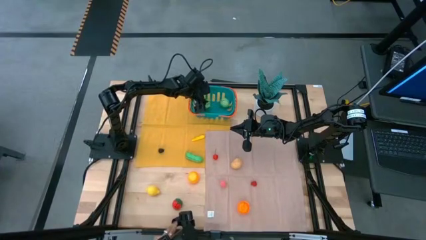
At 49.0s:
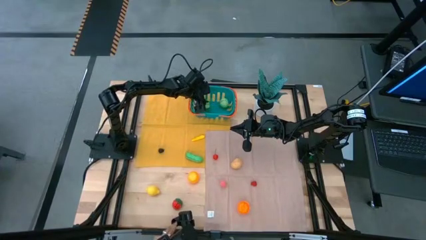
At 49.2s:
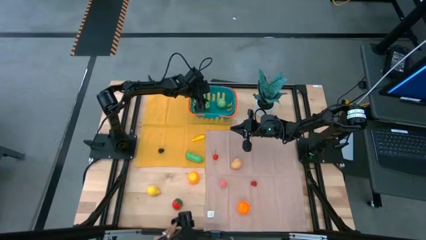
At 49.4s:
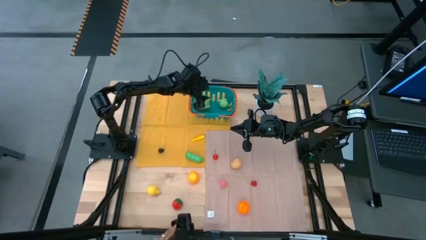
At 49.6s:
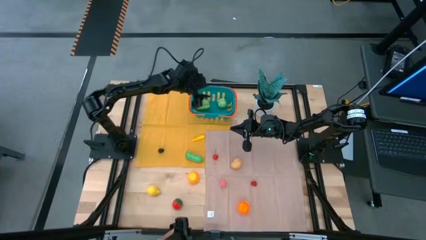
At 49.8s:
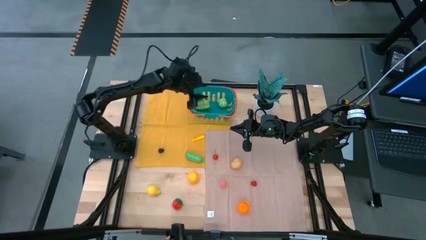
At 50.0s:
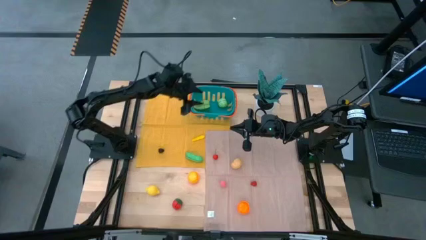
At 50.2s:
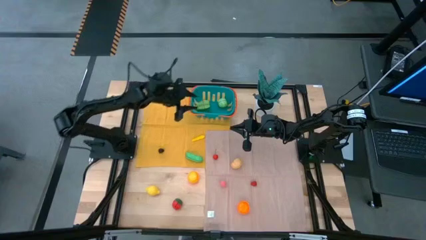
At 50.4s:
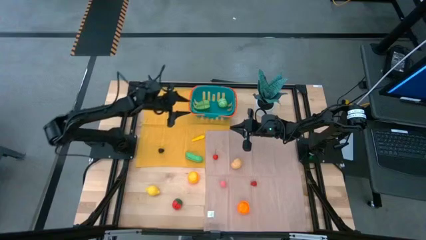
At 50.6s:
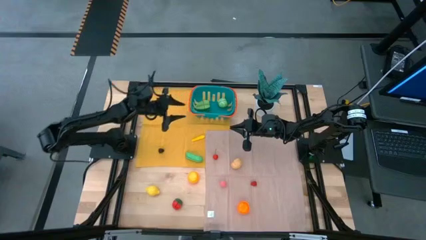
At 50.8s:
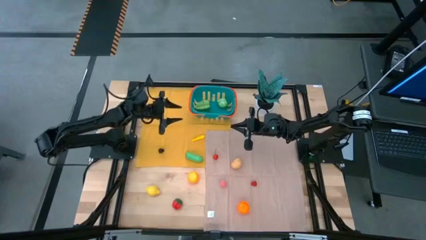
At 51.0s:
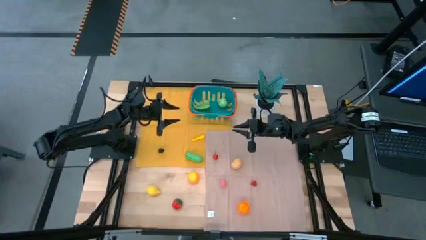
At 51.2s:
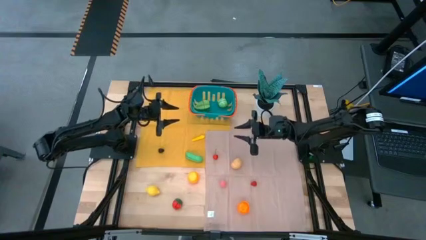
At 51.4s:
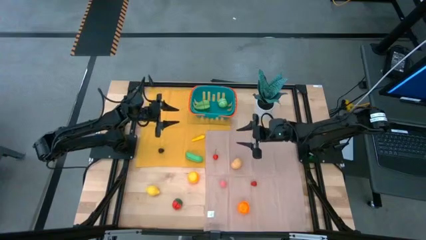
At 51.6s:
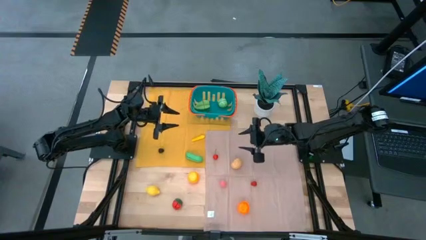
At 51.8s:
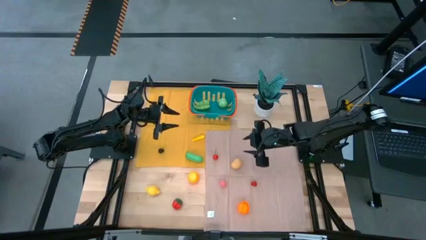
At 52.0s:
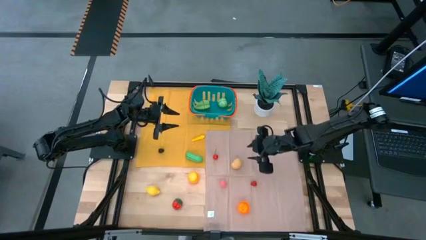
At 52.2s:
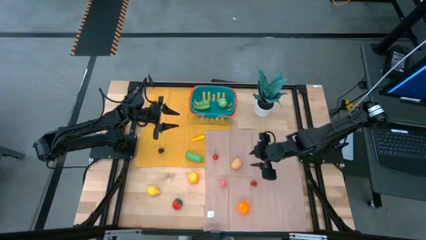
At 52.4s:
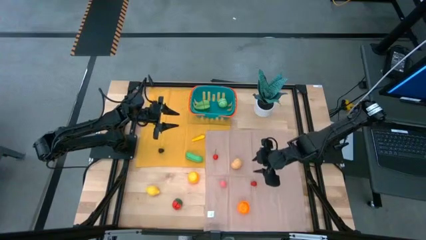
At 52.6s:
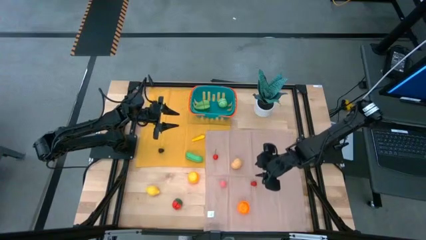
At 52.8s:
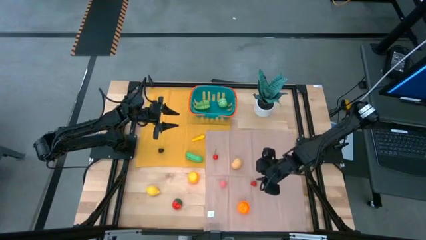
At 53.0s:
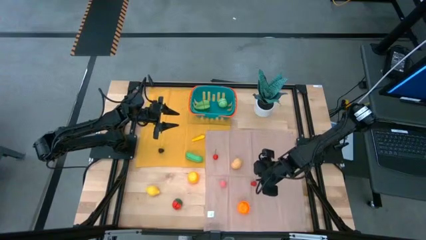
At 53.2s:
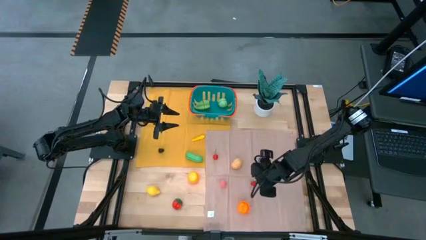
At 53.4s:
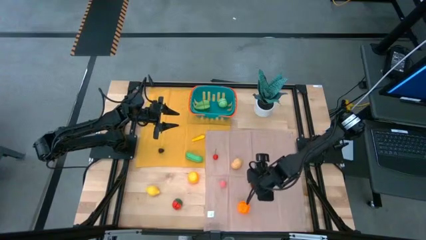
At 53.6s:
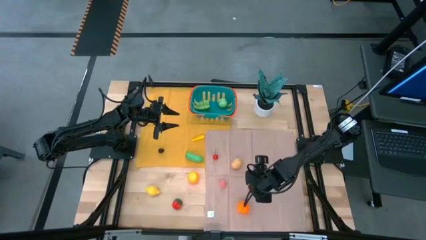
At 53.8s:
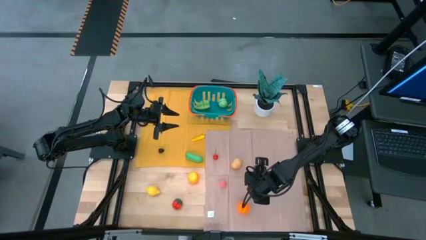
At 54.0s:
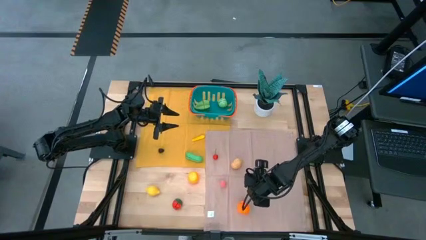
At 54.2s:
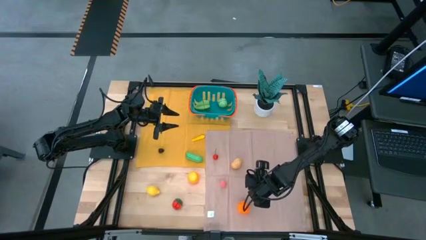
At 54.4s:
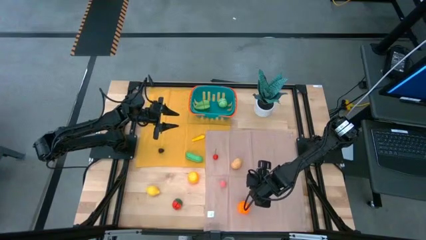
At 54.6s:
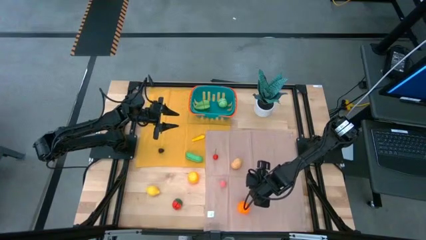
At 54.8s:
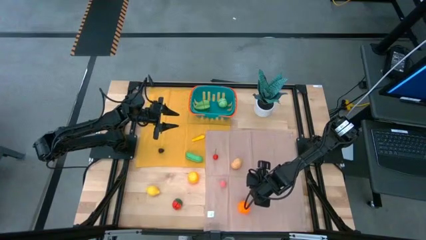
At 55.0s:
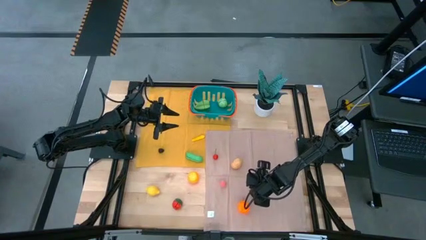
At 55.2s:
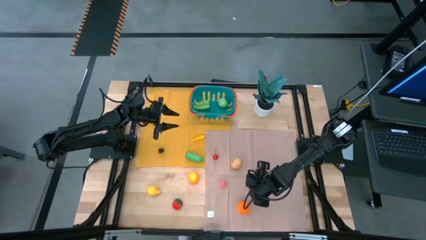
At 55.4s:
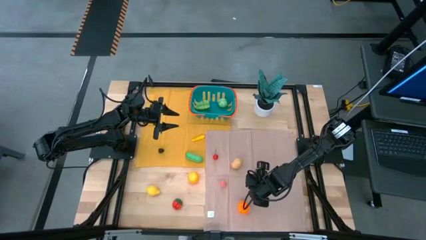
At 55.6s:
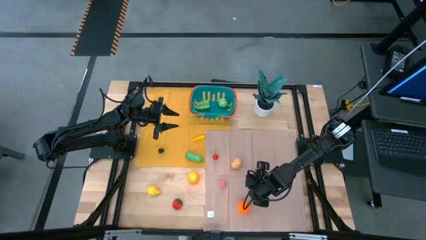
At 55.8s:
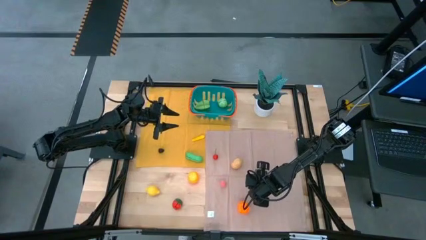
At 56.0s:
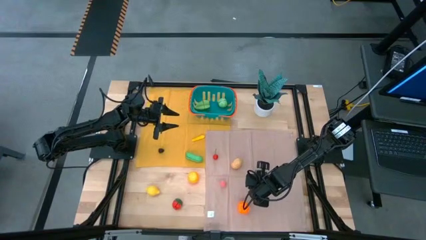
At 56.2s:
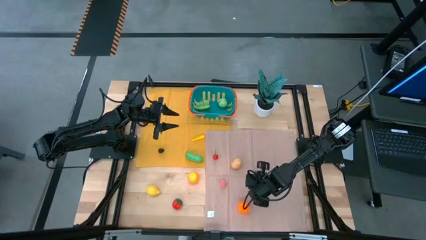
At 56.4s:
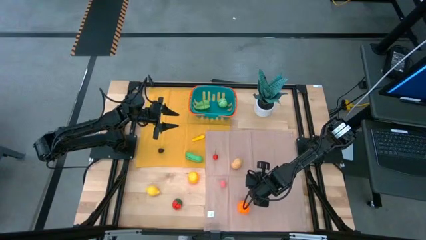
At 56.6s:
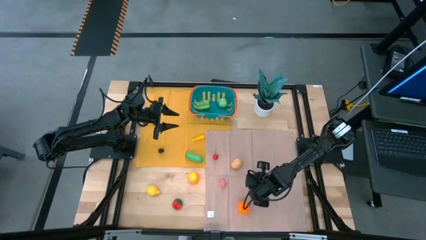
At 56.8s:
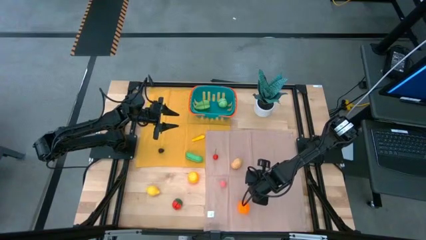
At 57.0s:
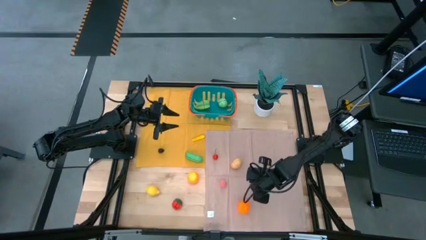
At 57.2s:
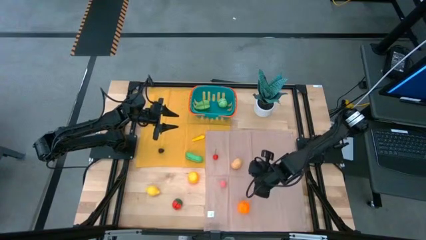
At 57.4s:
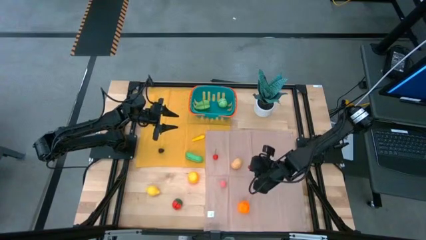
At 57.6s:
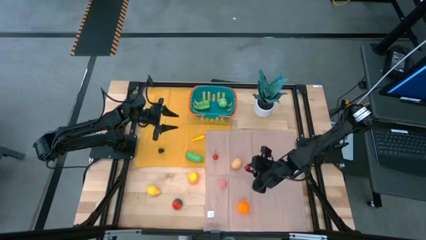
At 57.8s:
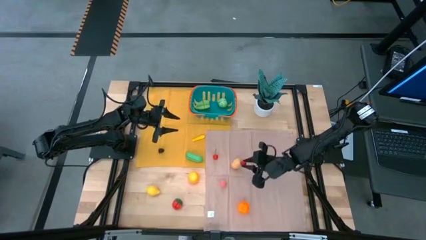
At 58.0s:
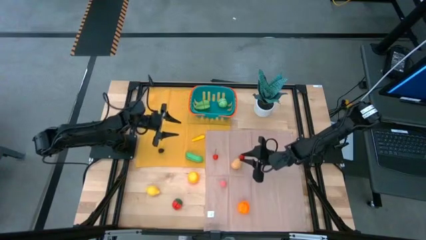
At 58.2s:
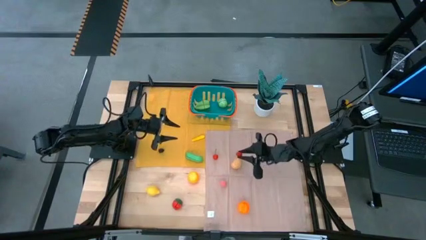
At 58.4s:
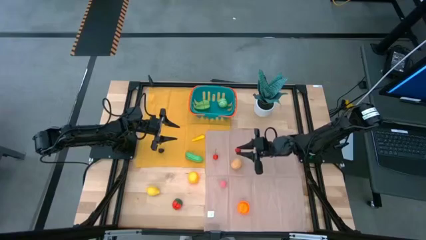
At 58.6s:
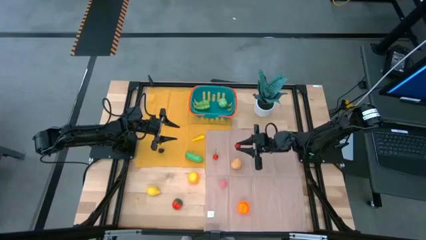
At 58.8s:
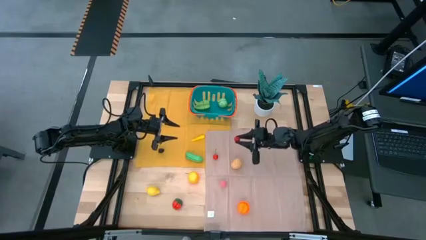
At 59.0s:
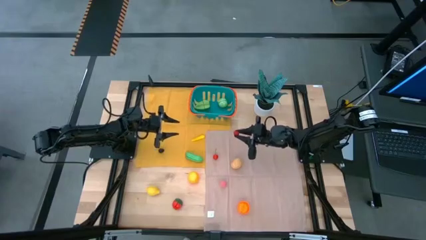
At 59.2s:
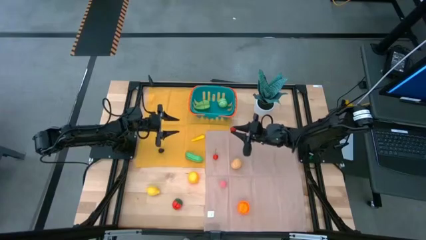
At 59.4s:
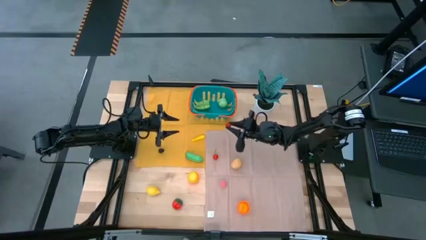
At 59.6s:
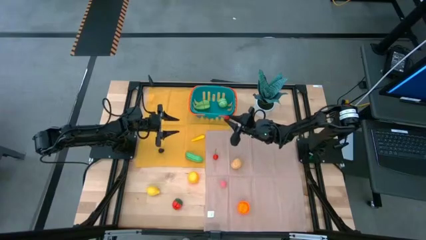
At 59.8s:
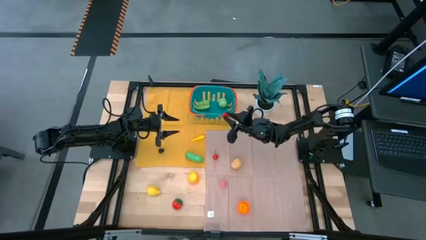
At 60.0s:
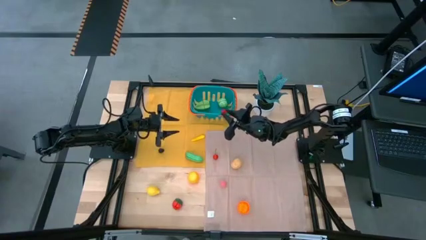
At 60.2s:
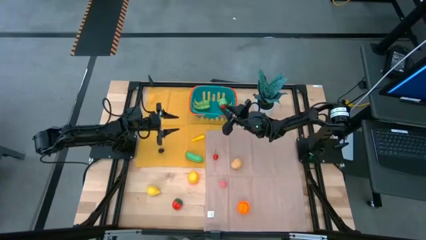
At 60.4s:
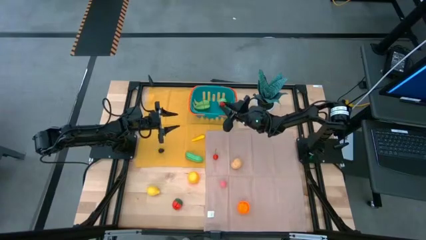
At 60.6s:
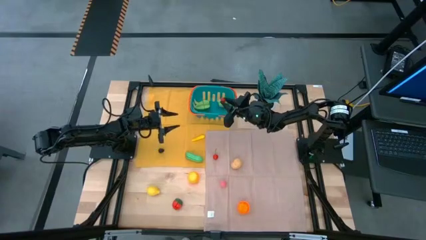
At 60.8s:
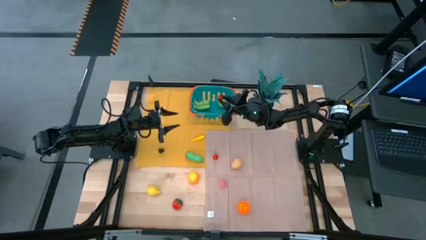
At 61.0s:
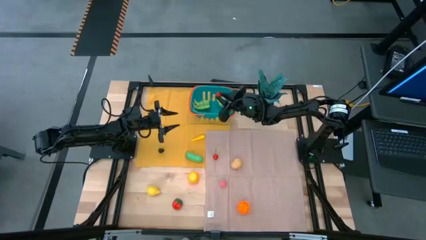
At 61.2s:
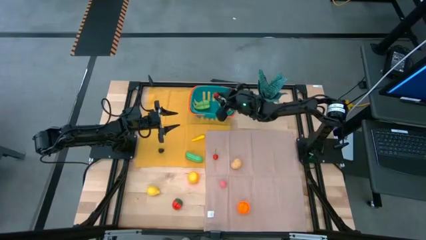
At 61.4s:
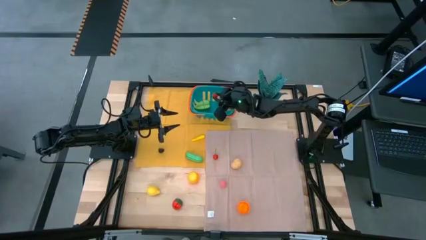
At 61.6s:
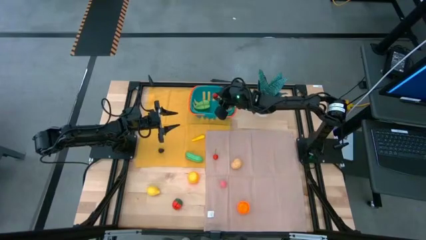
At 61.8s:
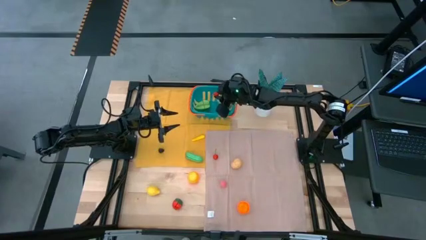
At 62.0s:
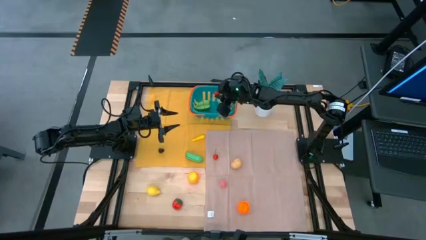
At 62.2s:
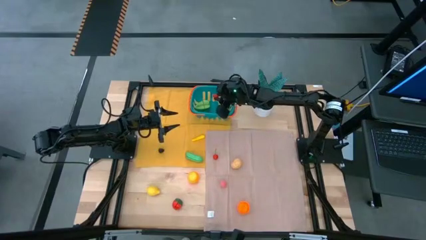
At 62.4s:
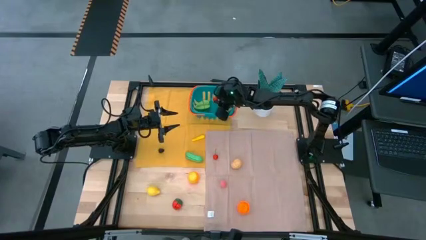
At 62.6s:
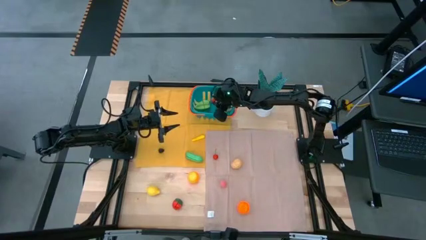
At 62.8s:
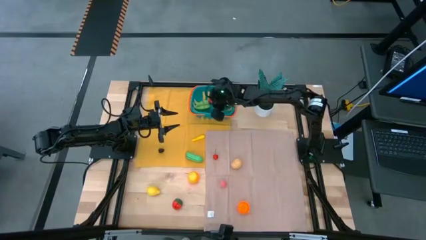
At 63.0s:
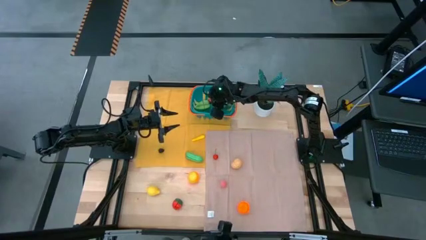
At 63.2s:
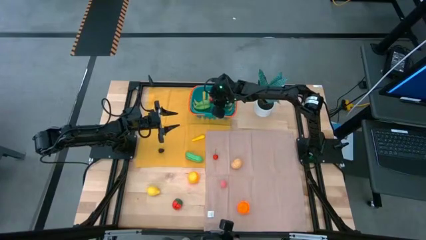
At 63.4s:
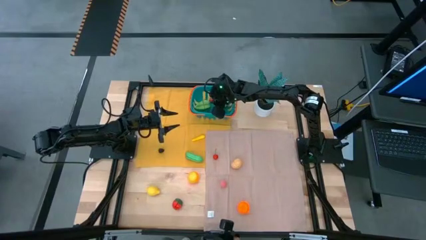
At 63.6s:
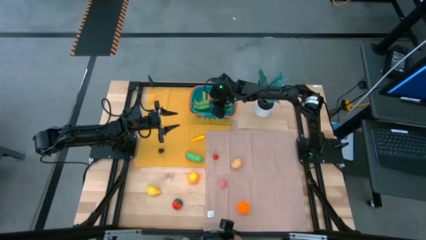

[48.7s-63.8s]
Task: Pick and placing Produce into tupperware
Put the red raspberry into the blue basket

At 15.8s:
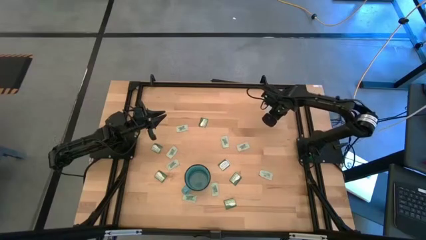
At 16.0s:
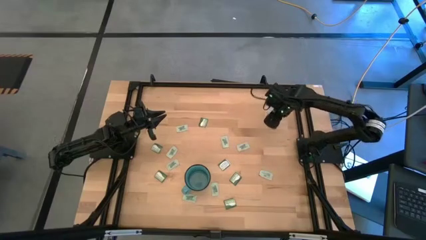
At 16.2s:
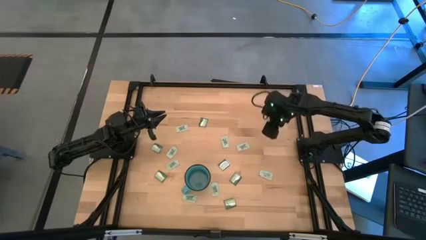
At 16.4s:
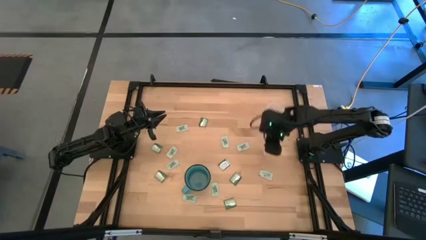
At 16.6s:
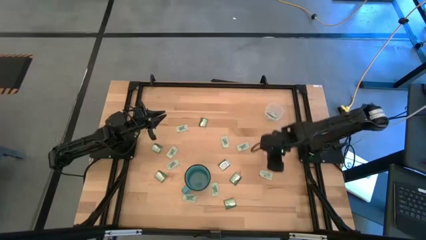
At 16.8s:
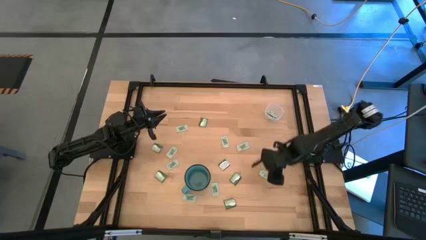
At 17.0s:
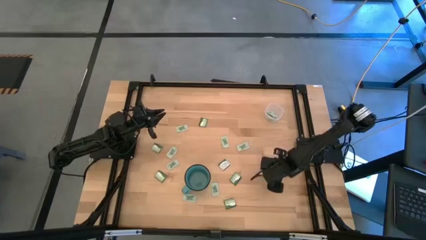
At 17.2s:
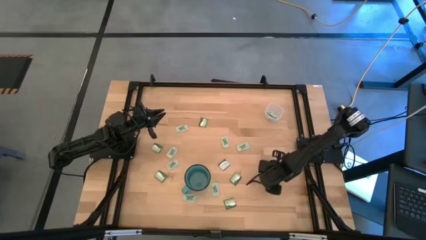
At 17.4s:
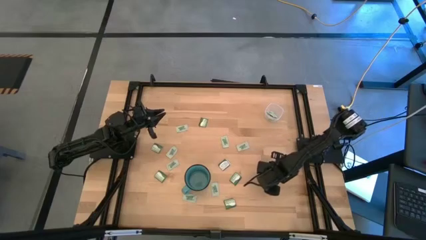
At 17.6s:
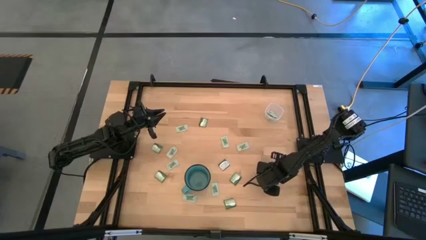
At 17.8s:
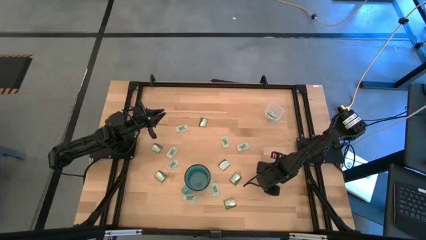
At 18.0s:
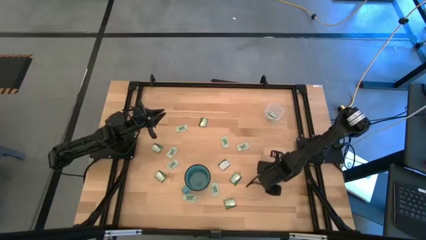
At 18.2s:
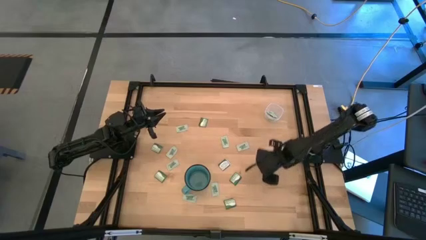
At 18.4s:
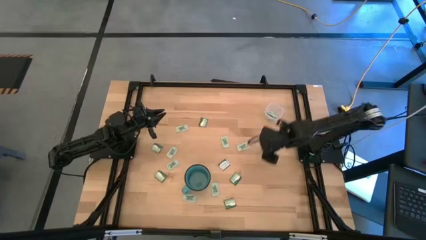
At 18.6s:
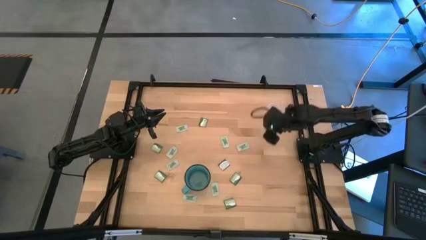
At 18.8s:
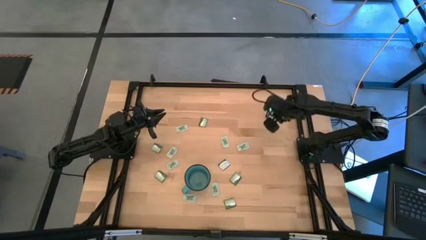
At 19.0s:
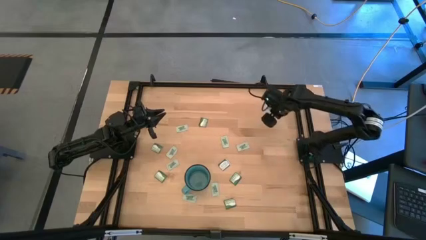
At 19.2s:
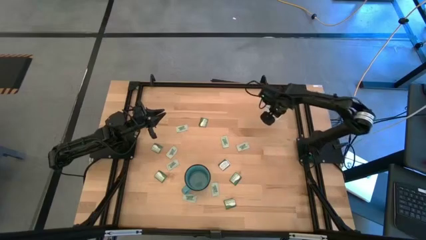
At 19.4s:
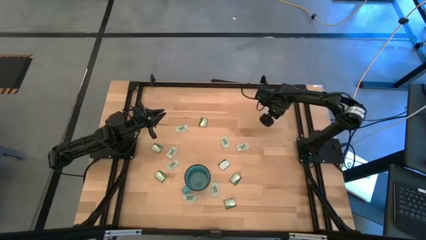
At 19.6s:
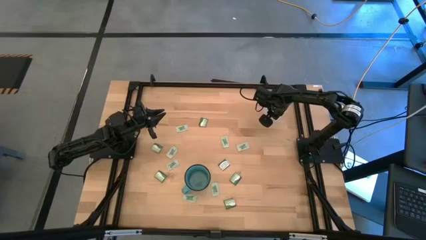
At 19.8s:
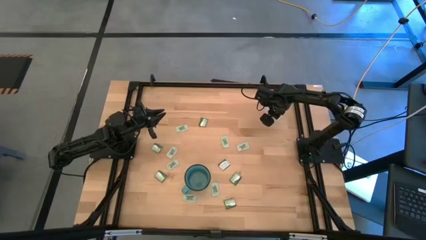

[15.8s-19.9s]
Task: Pick and place items into bin
Put the stevia packet into the transparent bin
